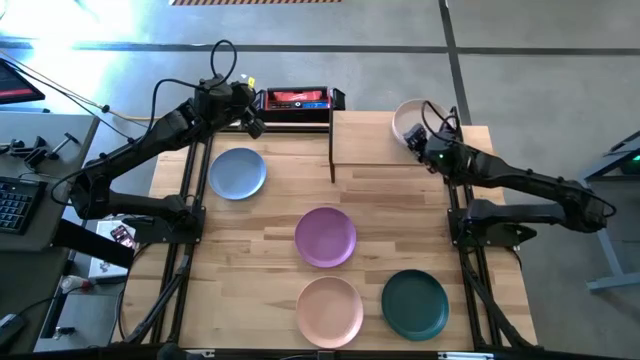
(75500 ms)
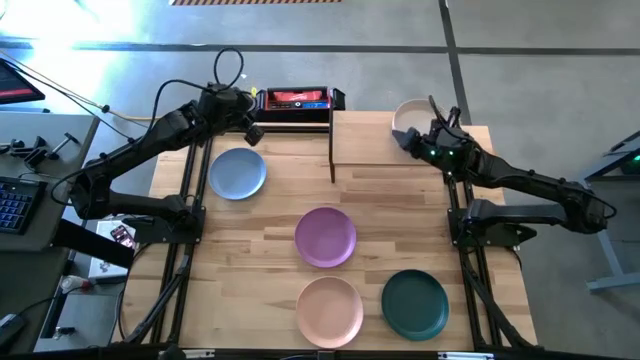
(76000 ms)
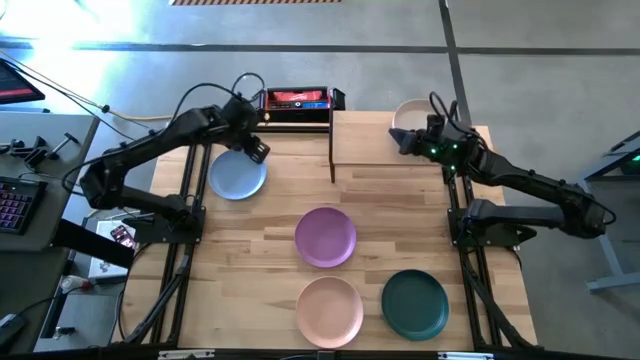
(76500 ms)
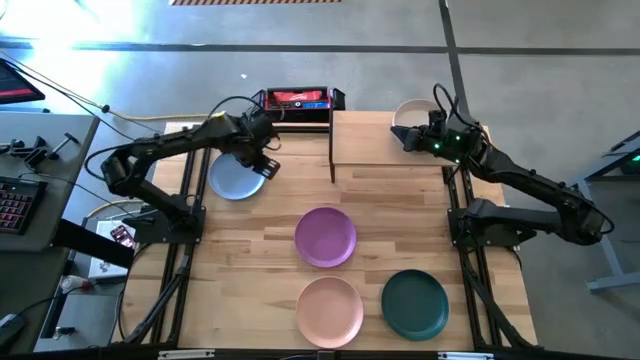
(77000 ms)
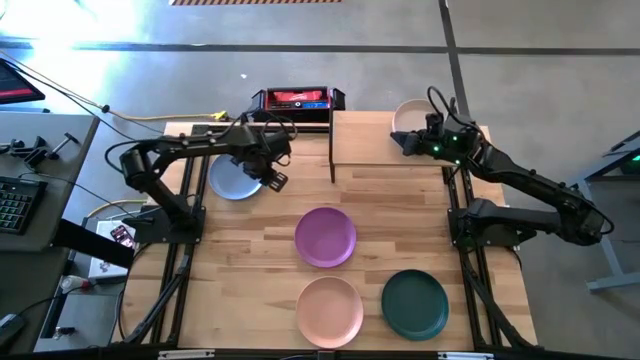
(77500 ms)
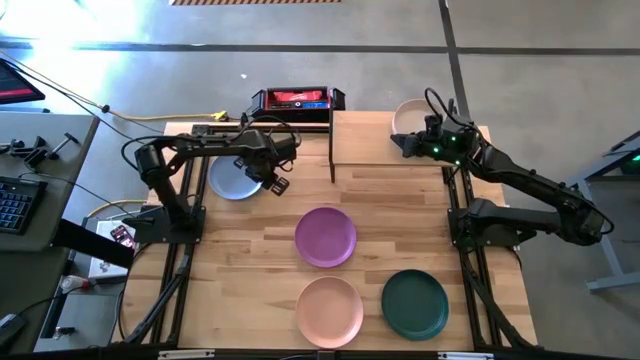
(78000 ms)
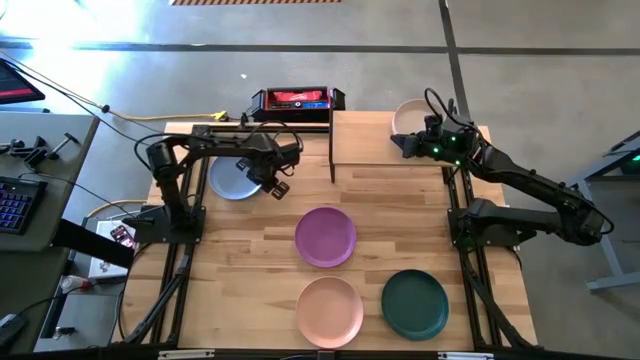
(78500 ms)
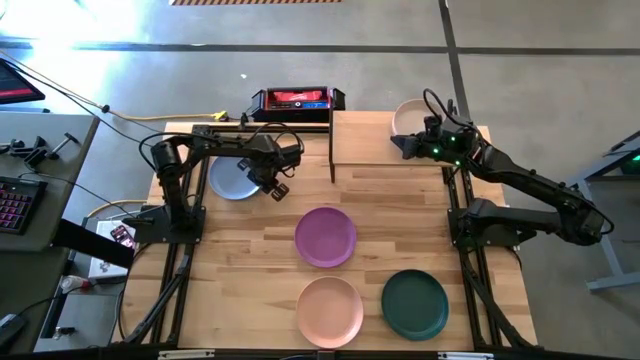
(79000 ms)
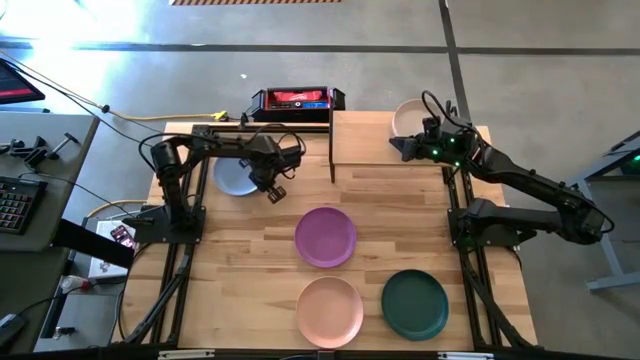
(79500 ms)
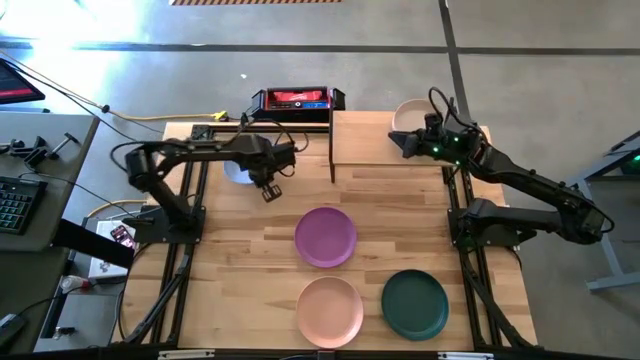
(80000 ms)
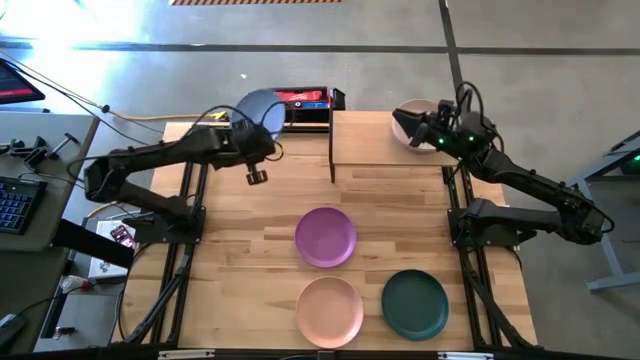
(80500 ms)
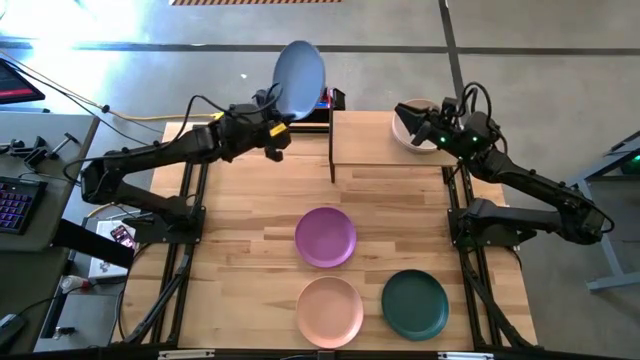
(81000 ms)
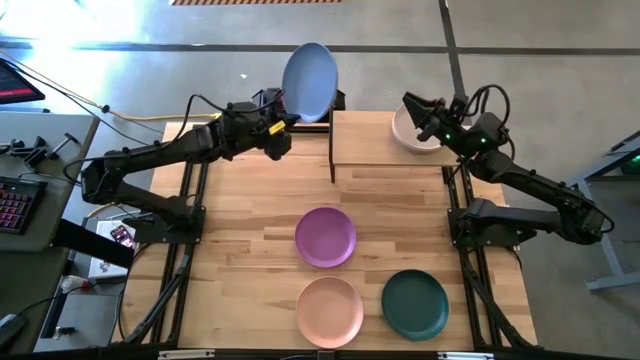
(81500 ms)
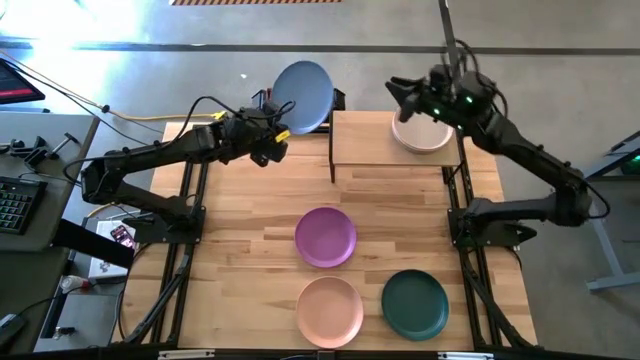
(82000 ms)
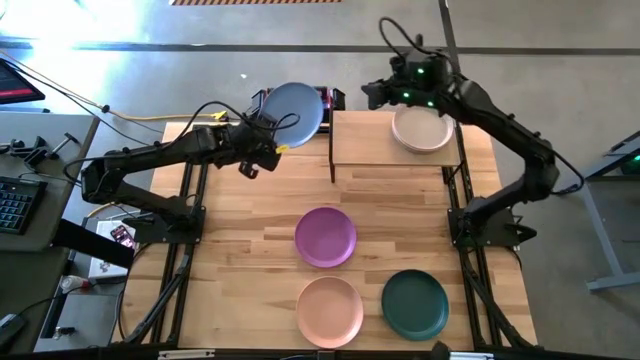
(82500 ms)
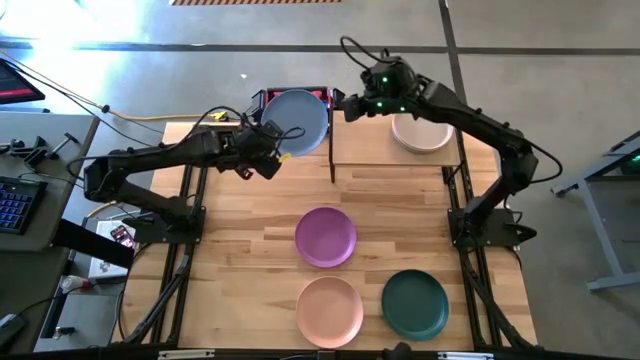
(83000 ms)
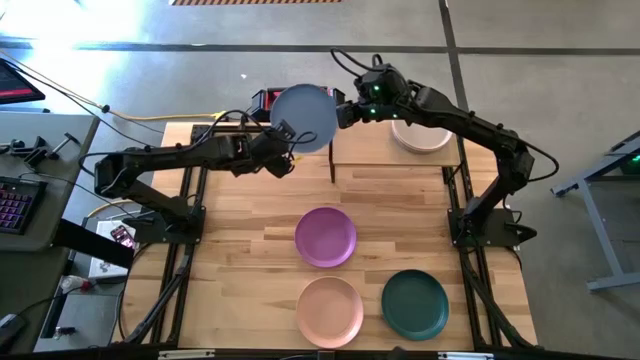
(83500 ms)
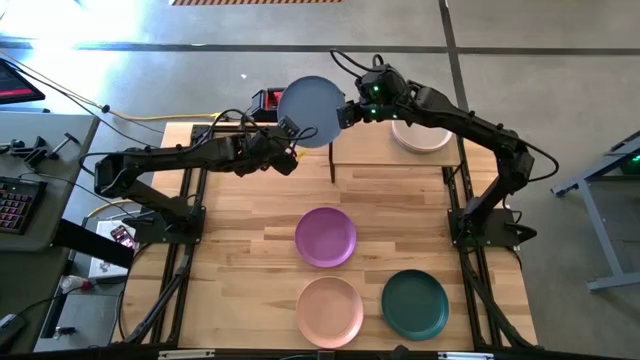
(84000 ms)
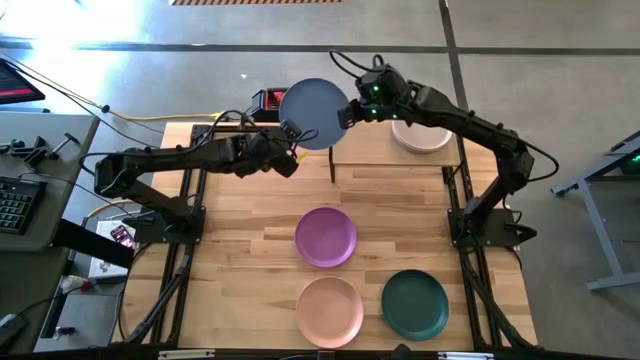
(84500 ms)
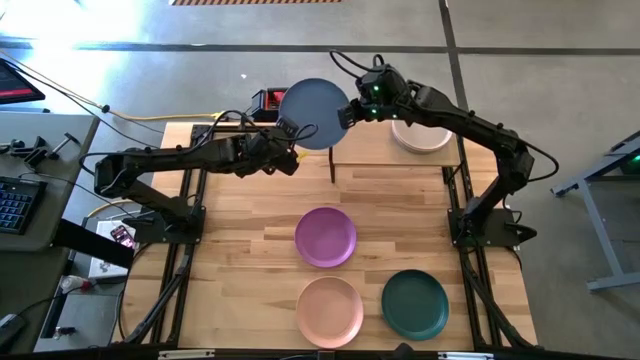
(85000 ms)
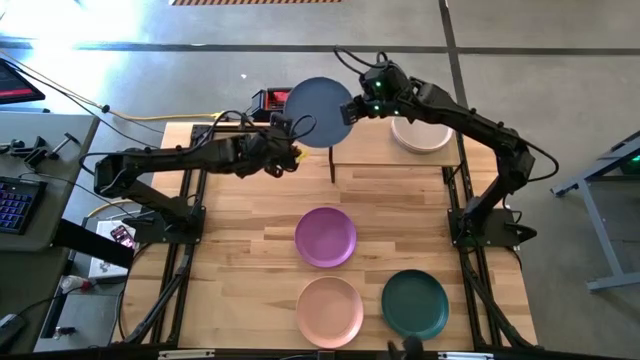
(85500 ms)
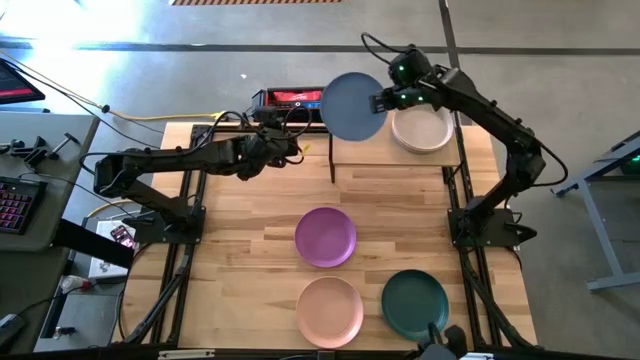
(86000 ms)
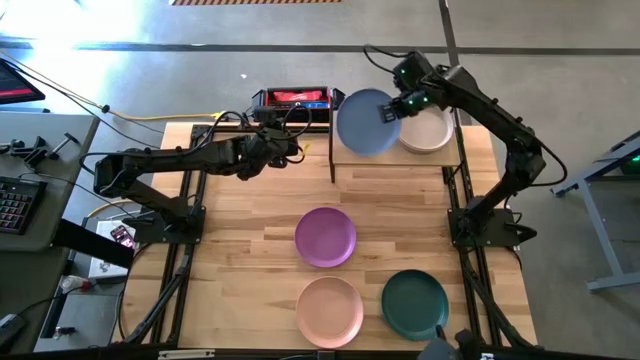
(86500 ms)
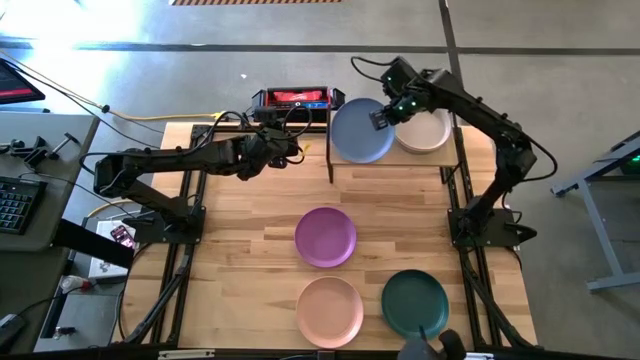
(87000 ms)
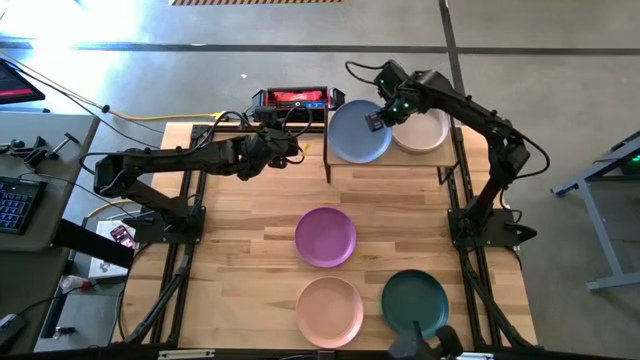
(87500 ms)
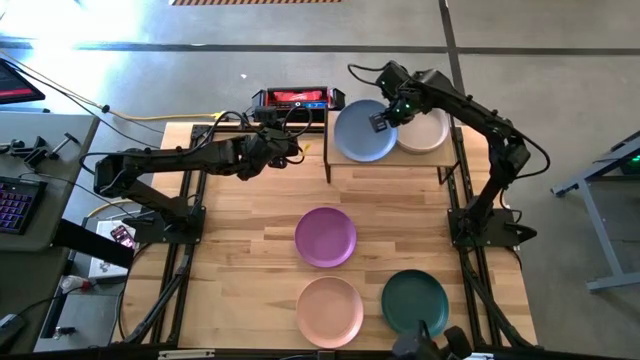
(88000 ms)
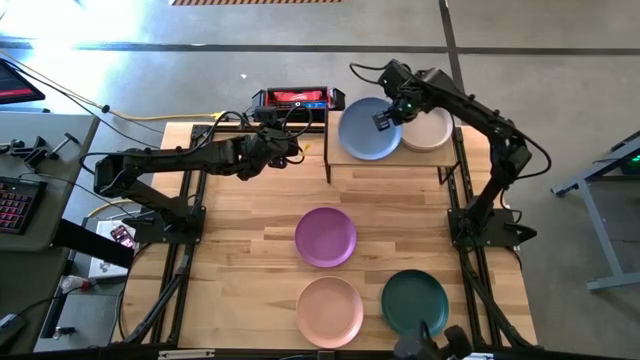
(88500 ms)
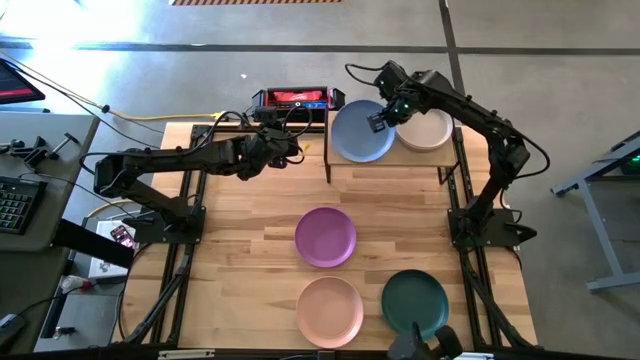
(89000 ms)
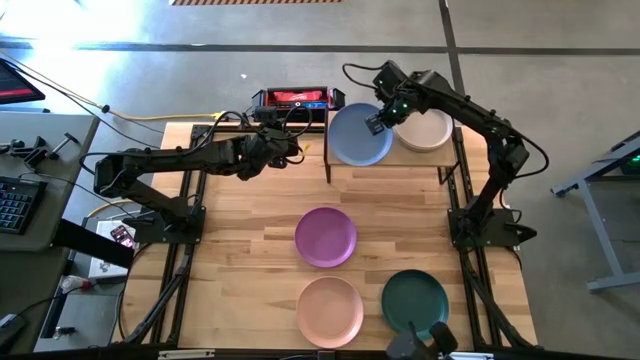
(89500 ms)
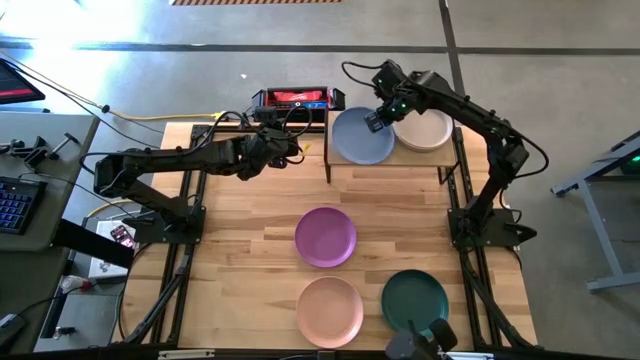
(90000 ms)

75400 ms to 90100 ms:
Task: Place and stack plates onto a shelf
Put the blue plate on the shelf

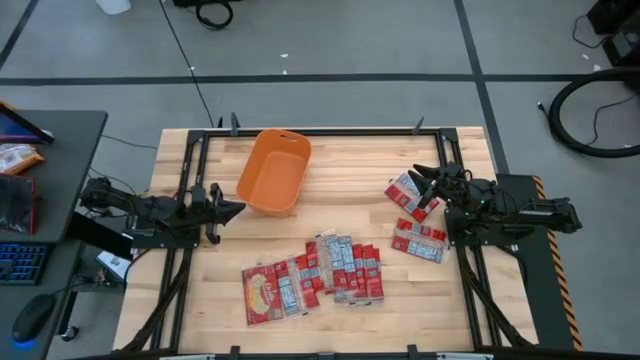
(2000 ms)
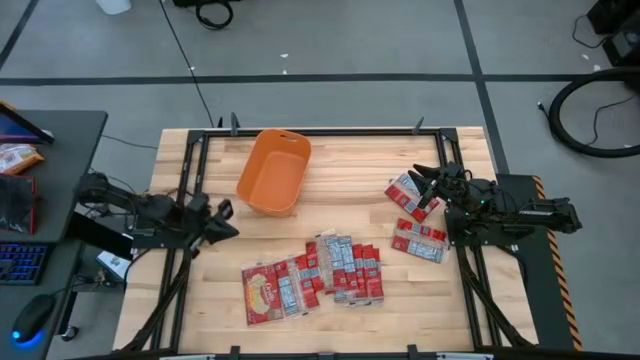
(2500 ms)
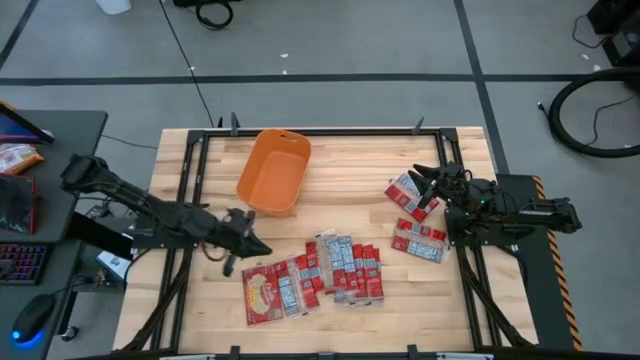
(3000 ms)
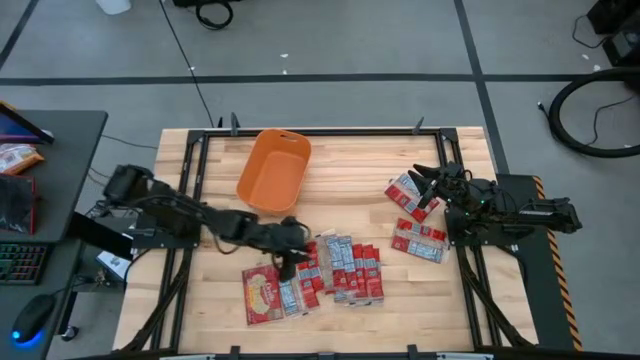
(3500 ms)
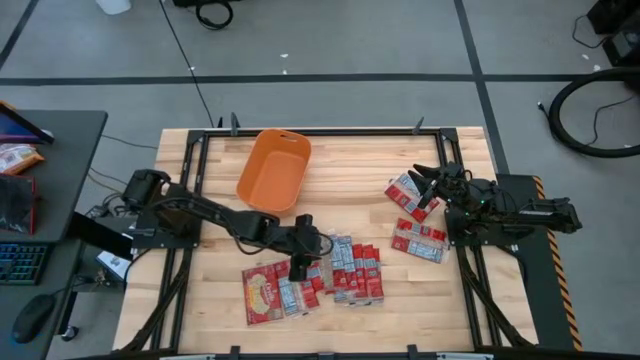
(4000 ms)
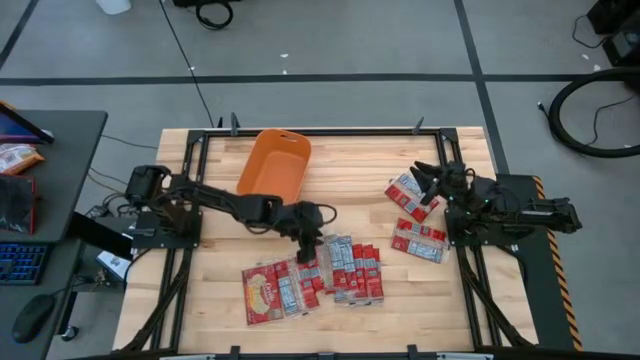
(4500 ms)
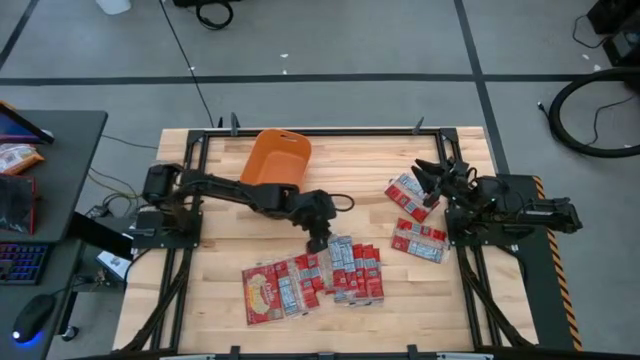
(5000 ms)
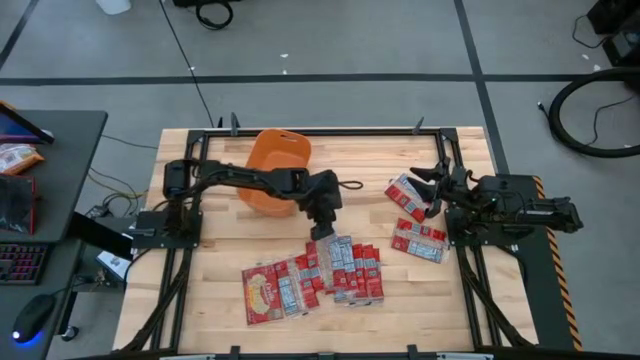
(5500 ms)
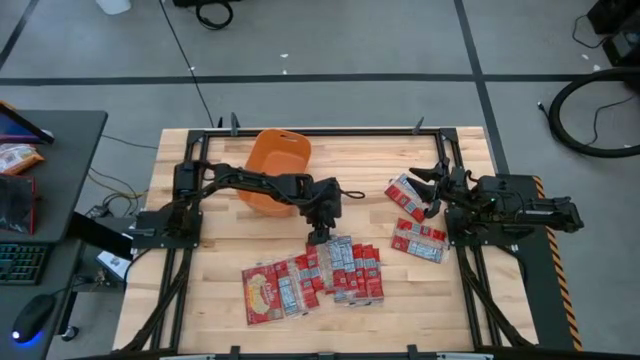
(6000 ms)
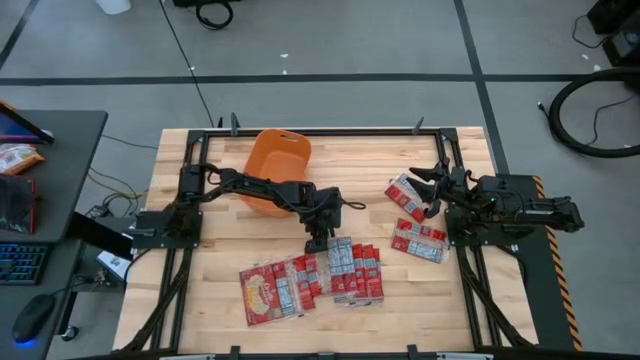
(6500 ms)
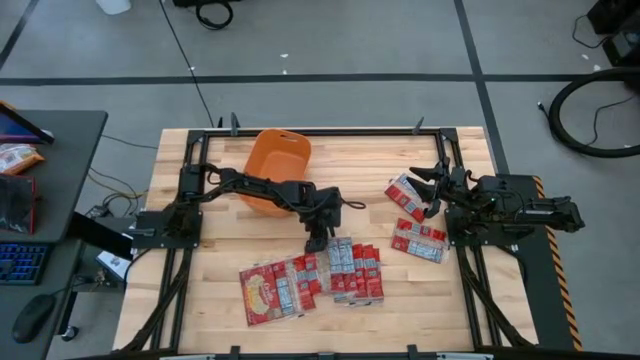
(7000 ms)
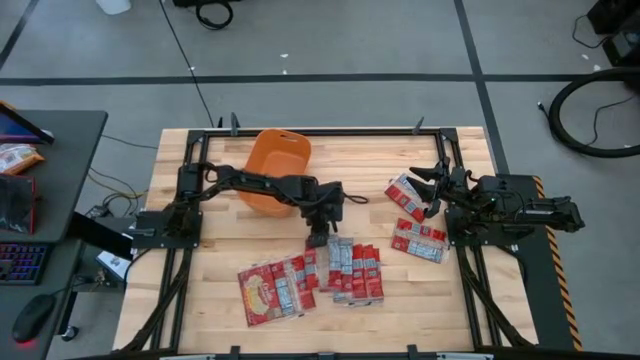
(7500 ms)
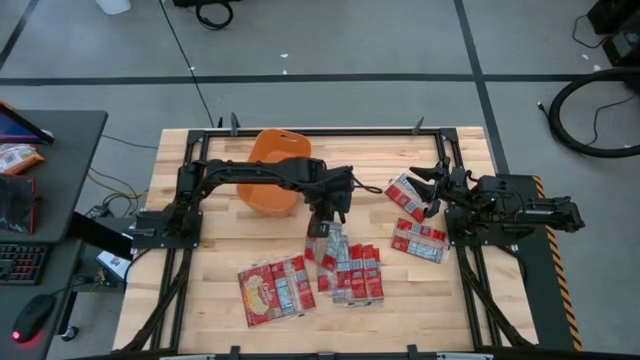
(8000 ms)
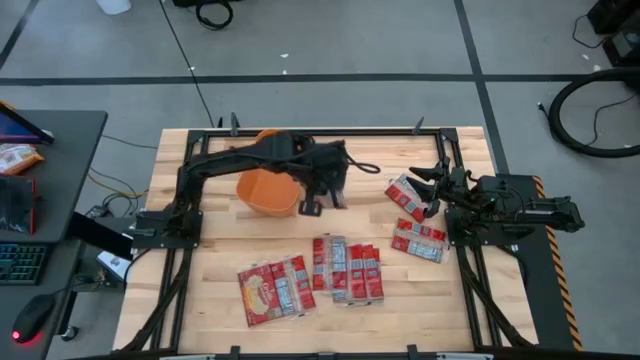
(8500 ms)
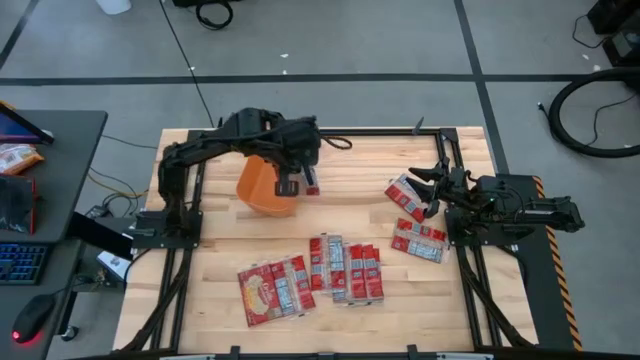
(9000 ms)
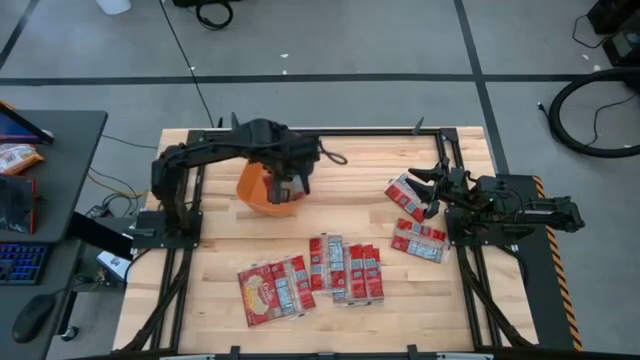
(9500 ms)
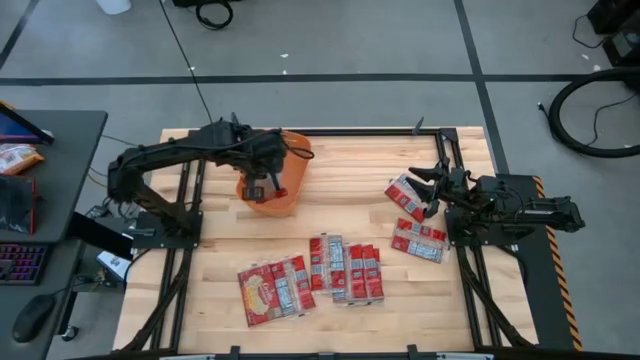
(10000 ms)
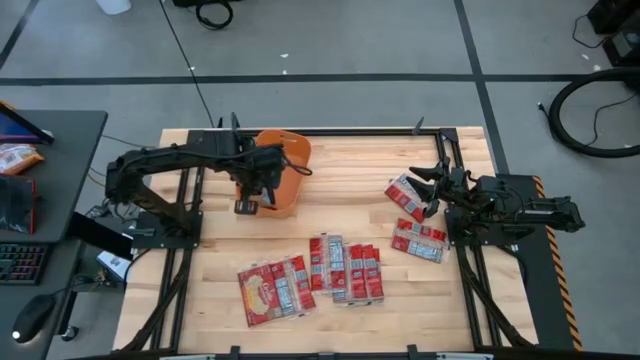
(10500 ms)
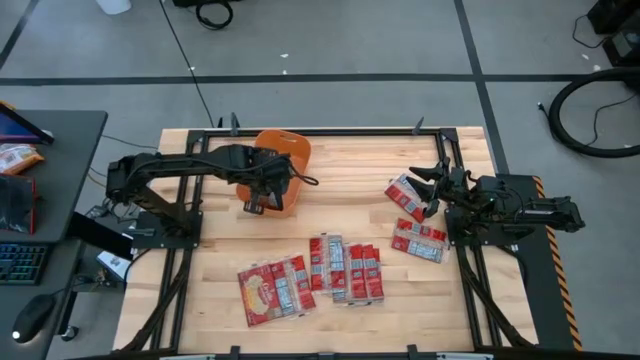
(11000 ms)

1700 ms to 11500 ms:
Task: Sort popcorn bags into baskets
Put the popcorn pack into the orange bin
